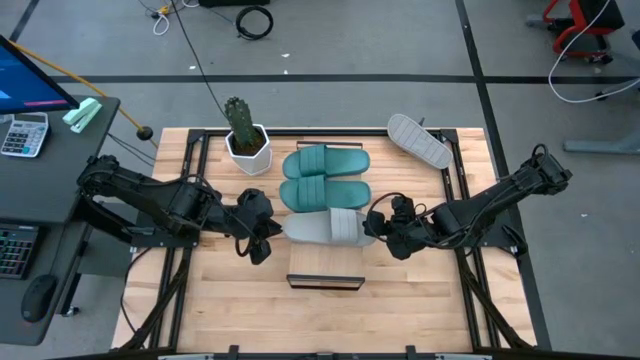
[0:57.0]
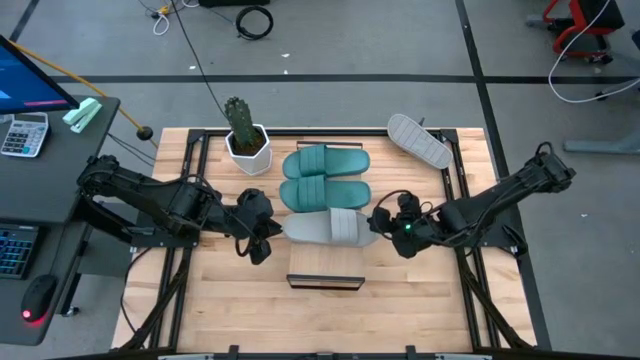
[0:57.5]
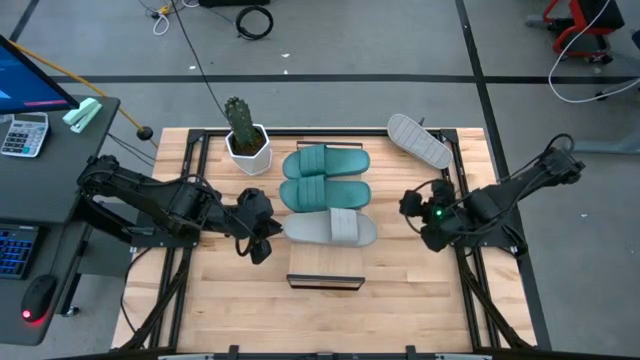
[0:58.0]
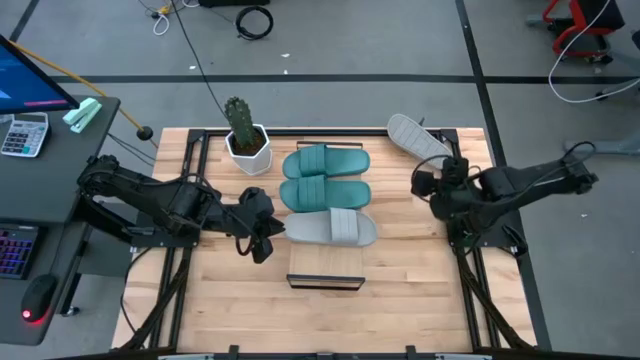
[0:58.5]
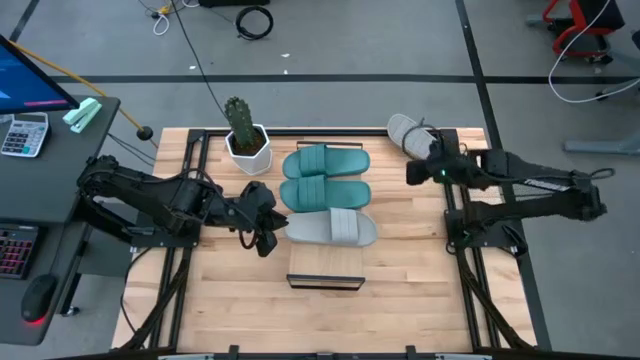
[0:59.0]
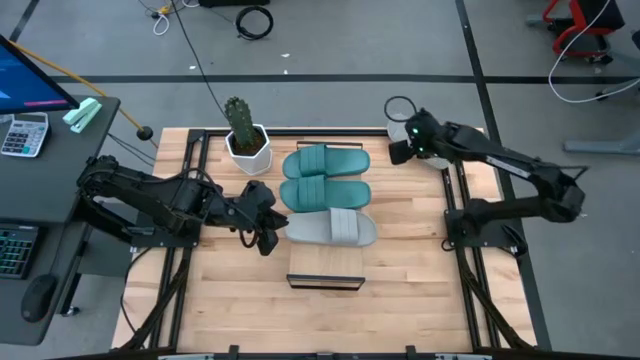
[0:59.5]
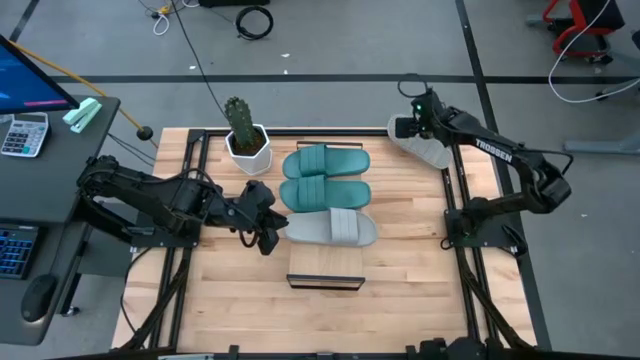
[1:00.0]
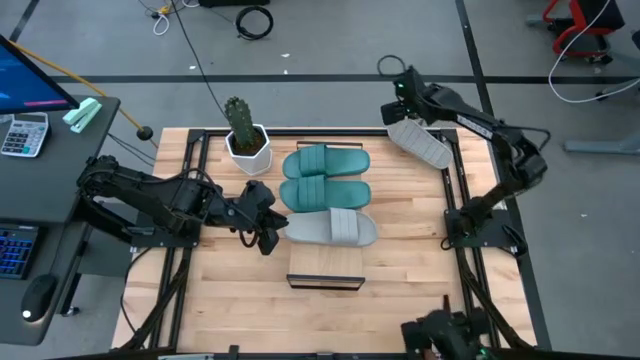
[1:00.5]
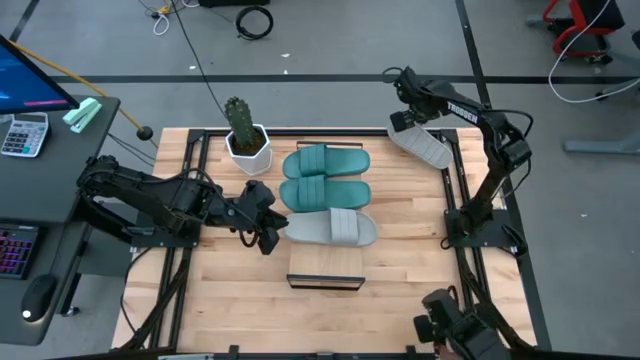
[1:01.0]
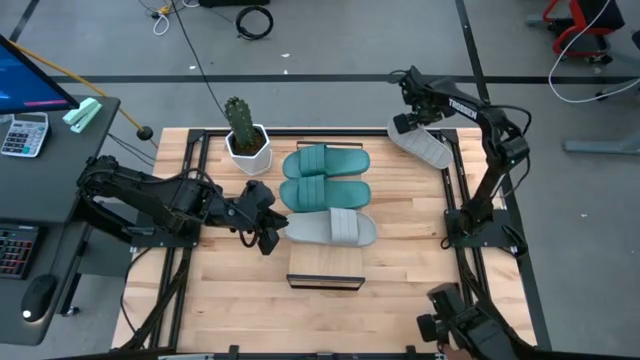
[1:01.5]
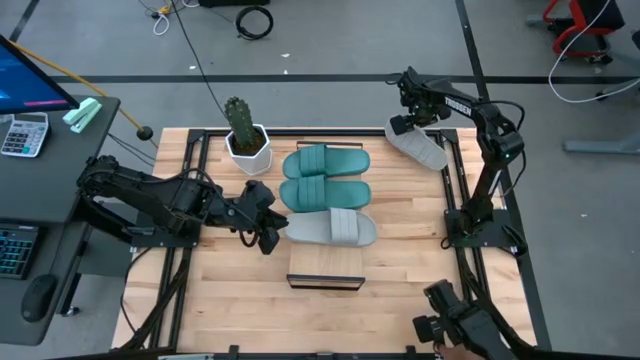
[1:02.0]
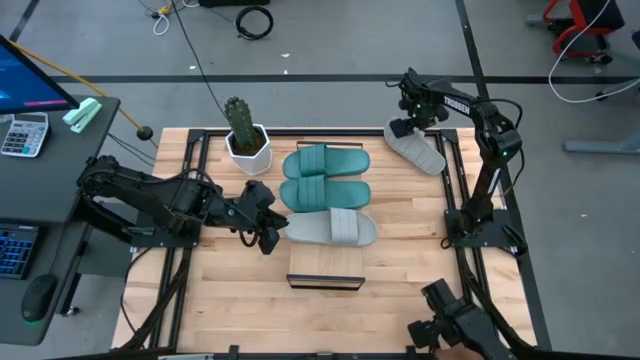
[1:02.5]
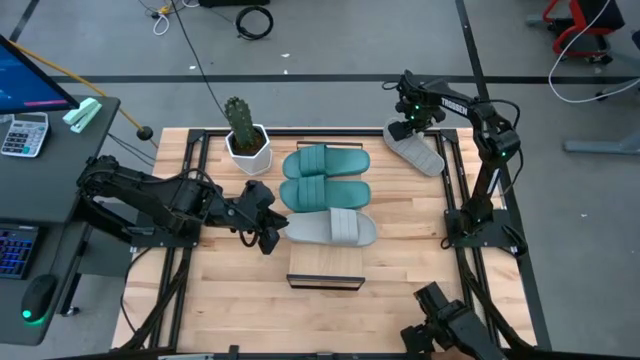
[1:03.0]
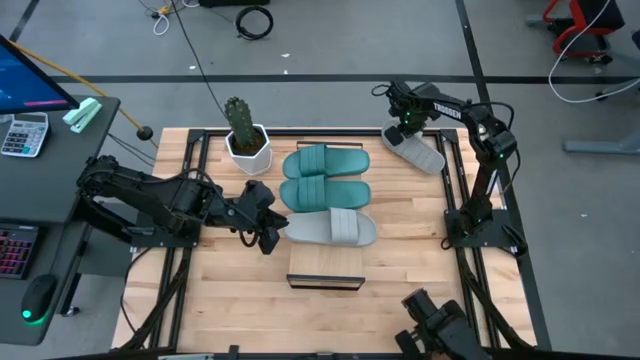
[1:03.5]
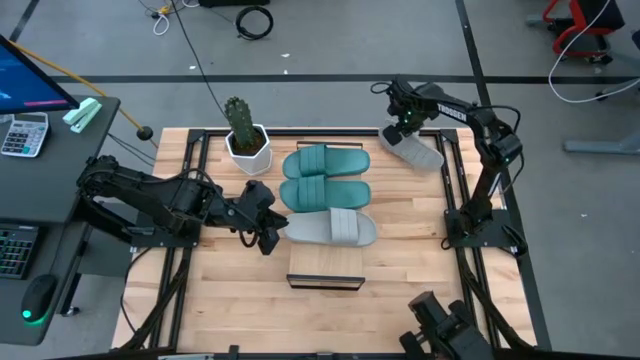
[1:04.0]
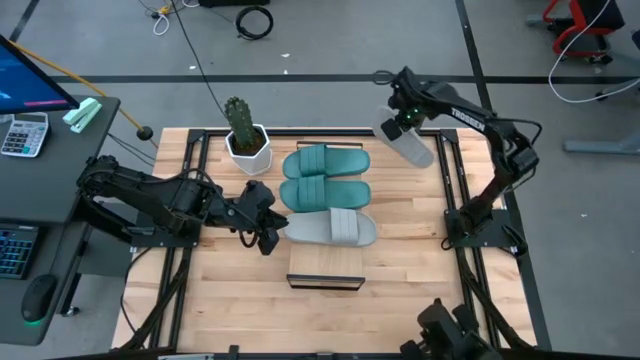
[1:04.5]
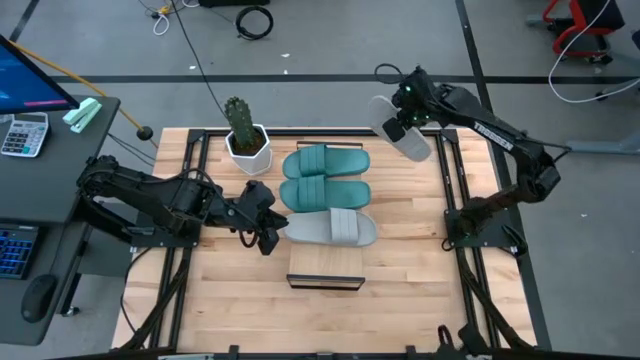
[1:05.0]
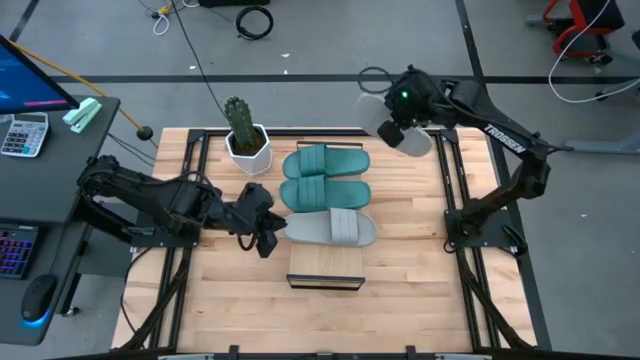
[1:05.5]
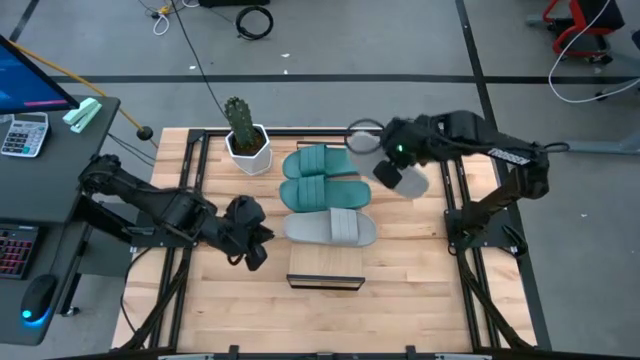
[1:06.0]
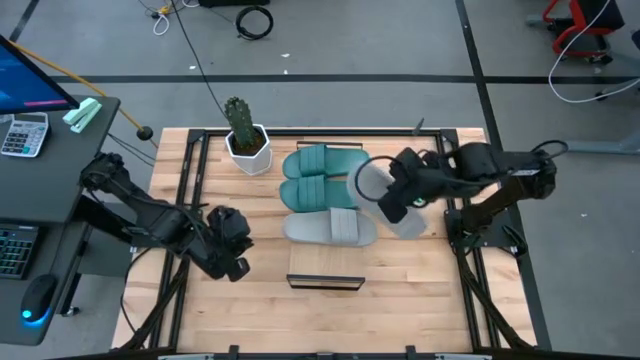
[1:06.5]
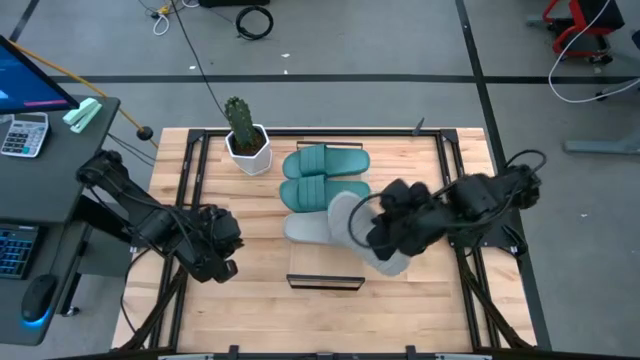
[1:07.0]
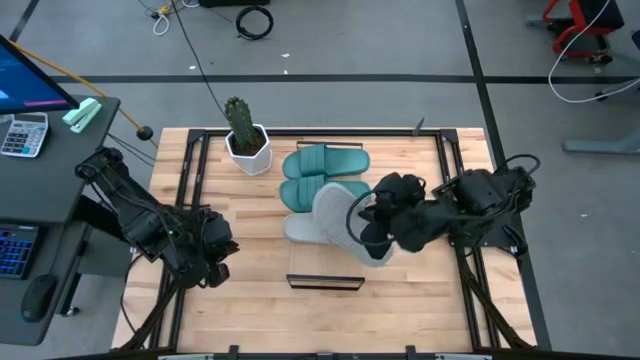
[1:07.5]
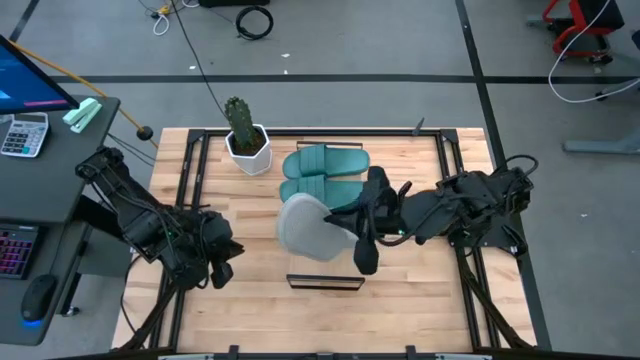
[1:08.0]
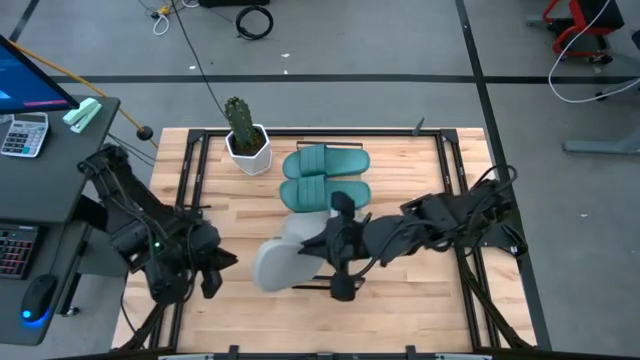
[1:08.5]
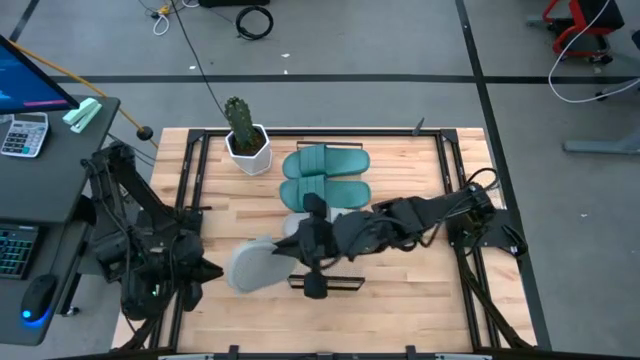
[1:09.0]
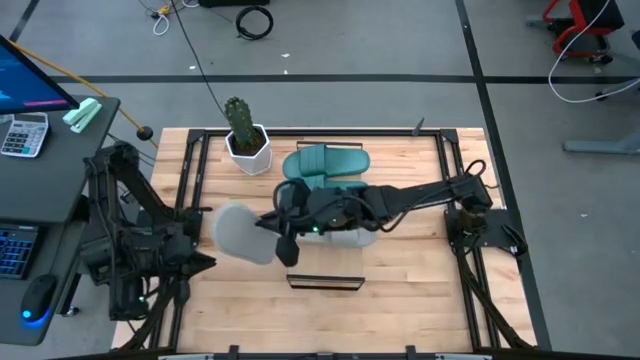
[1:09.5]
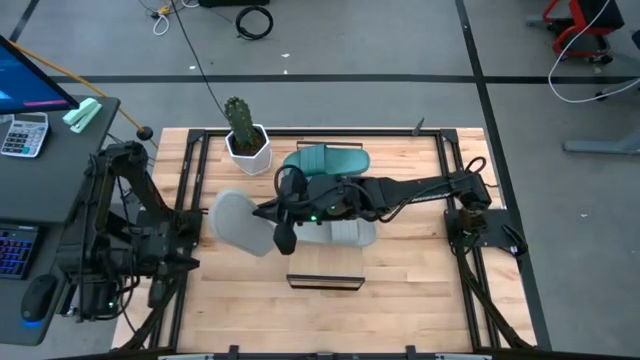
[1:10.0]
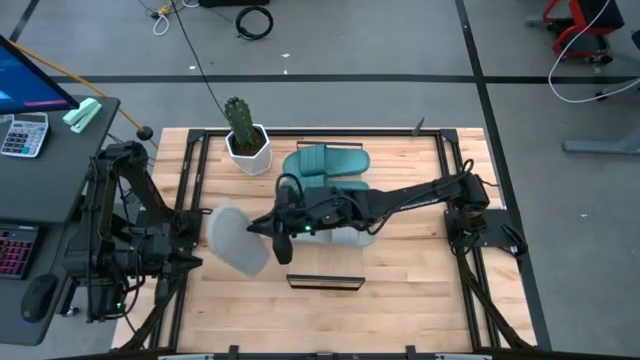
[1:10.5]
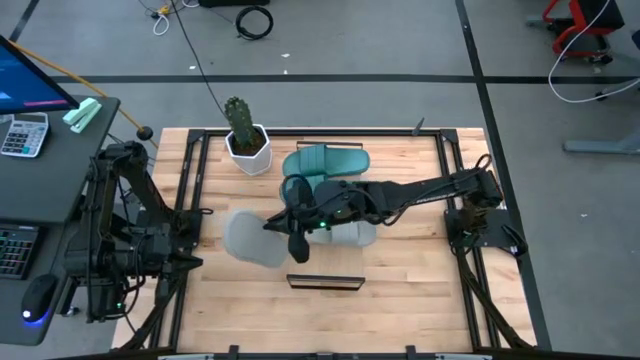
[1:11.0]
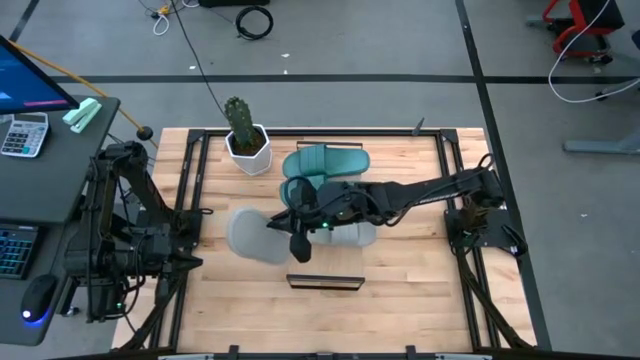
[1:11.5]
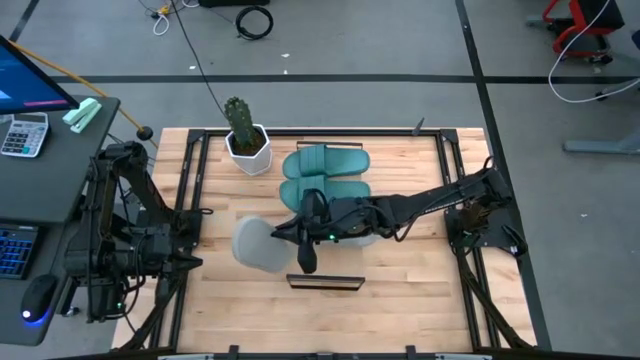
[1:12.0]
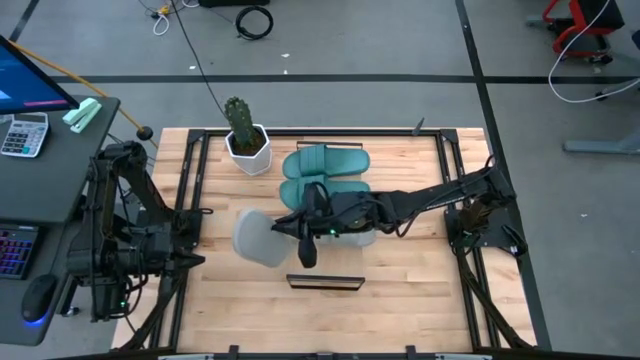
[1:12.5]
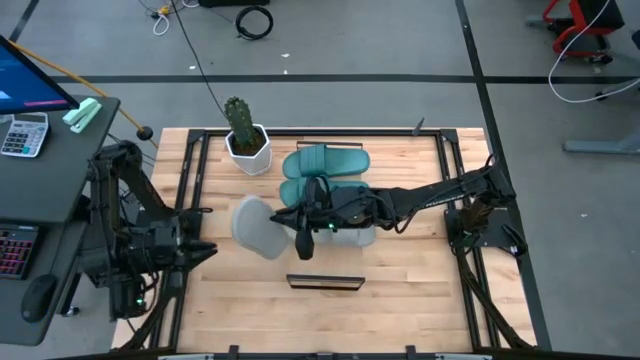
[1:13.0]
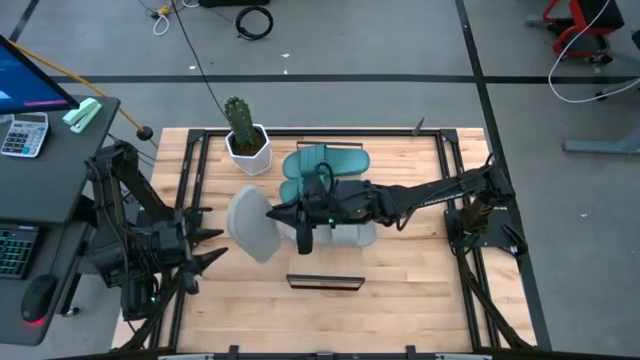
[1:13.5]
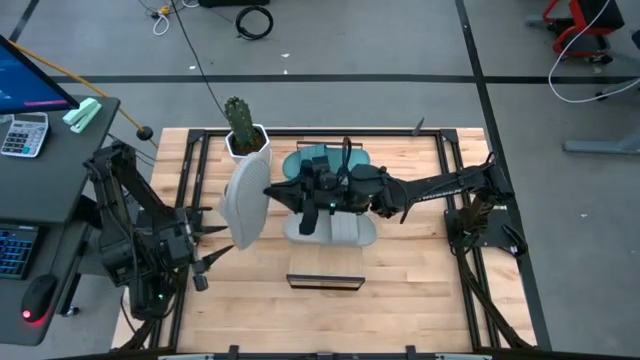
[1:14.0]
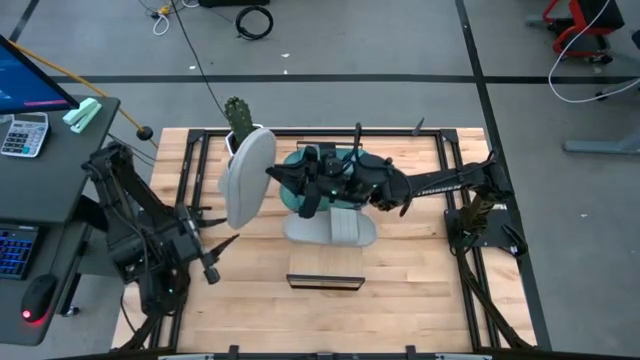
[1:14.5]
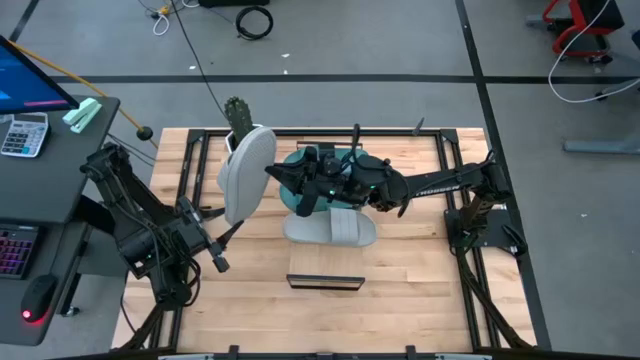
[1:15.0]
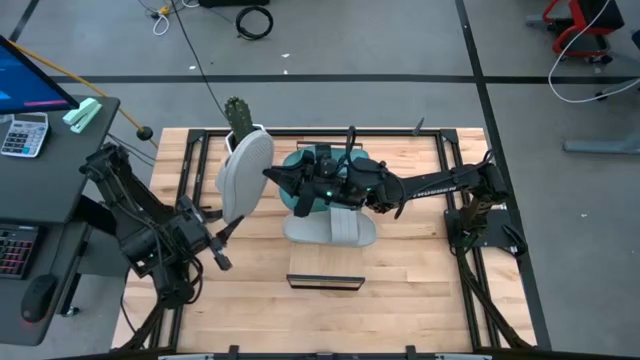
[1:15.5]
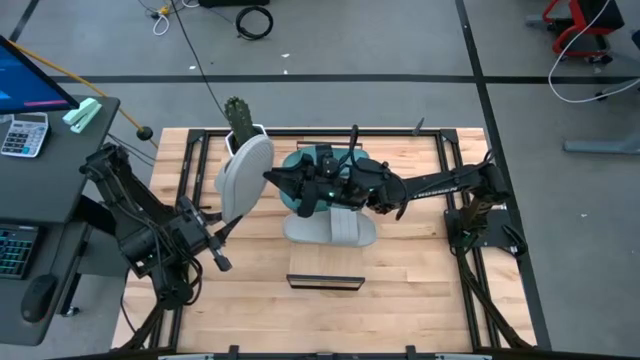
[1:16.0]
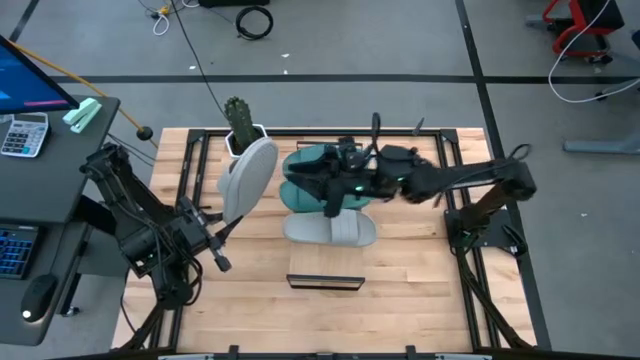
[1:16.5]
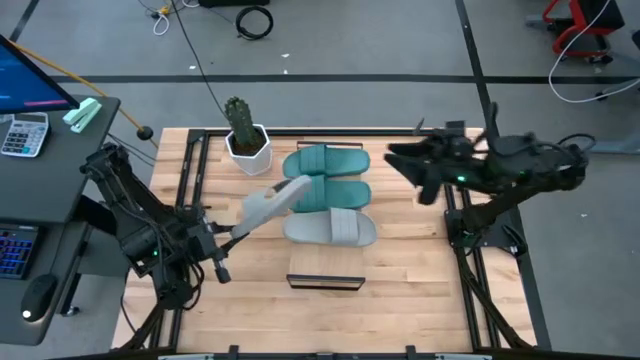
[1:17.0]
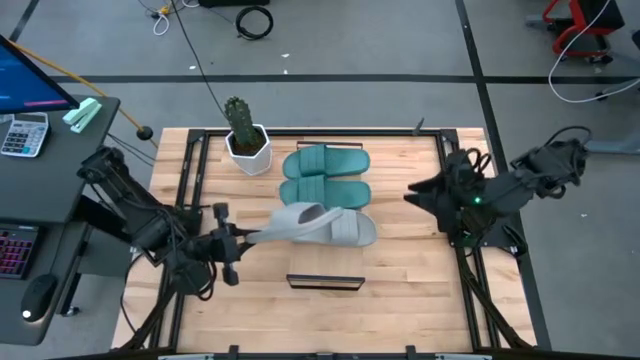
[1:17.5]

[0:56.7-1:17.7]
Task: Pick and place slides into the shelf
Put the gray slide on the shelf

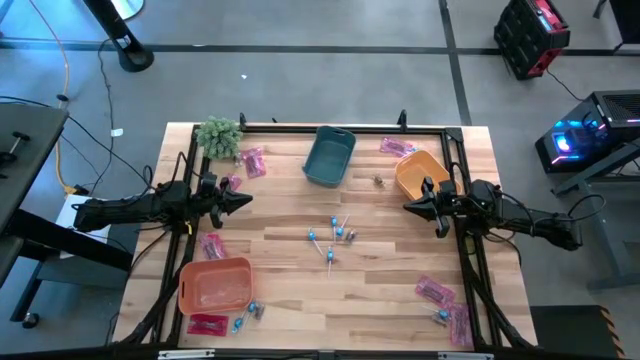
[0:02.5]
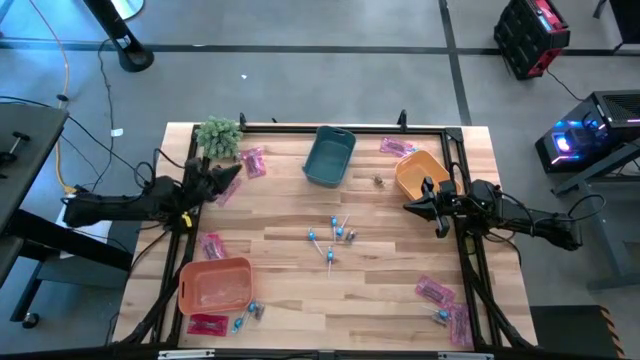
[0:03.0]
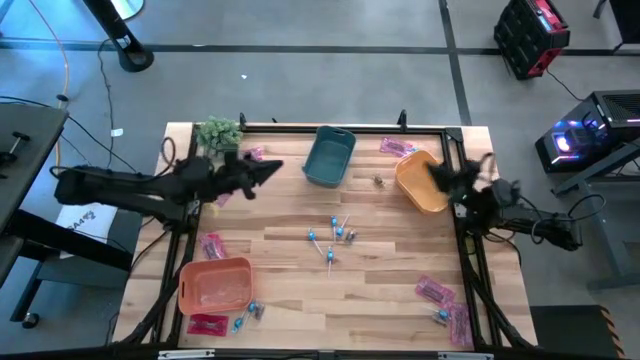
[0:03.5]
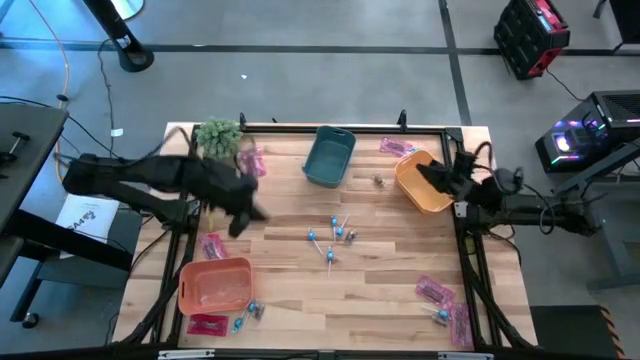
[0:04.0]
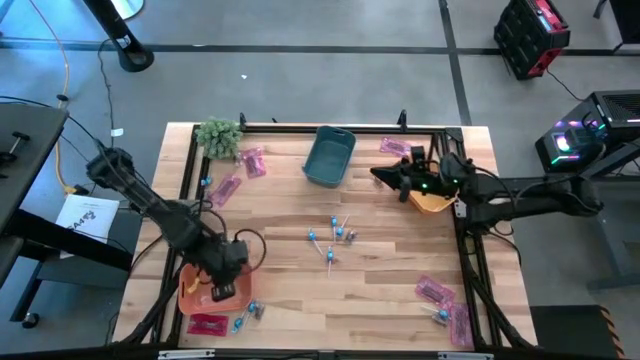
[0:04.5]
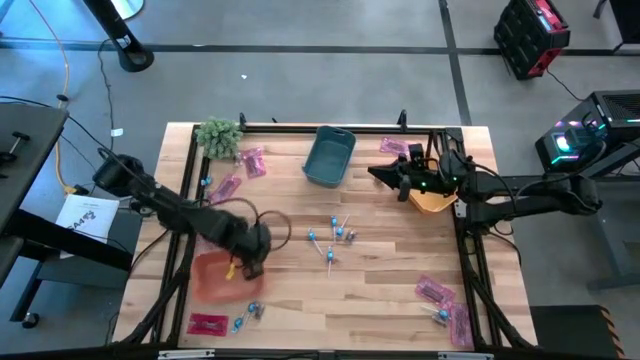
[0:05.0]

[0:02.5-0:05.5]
Task: Sort candy
Move the orange bin closer to the center
